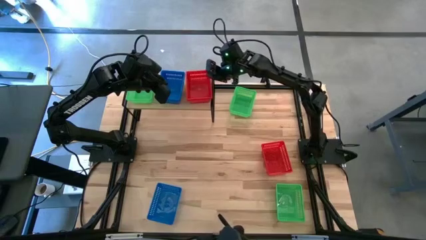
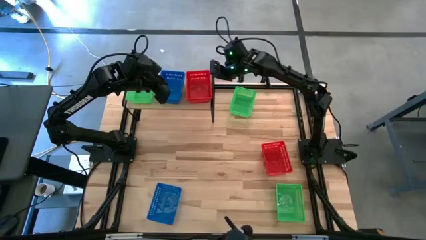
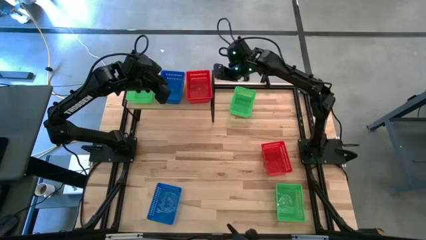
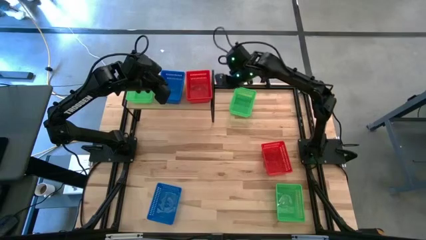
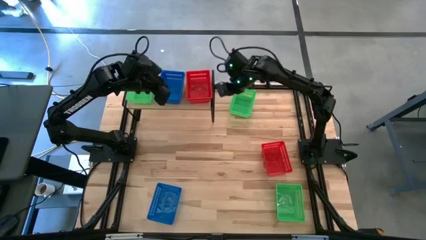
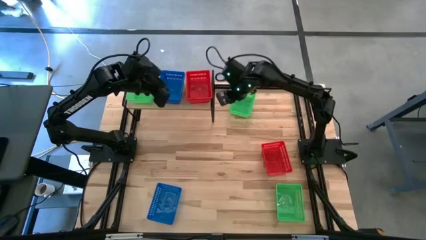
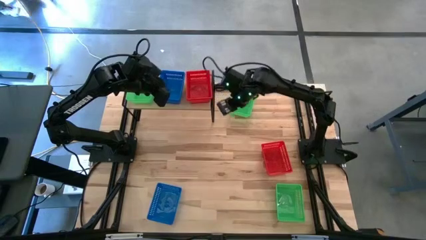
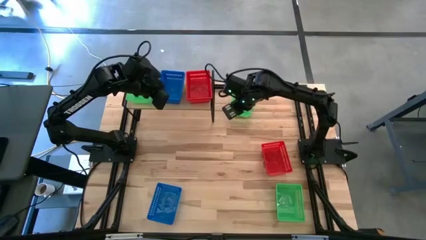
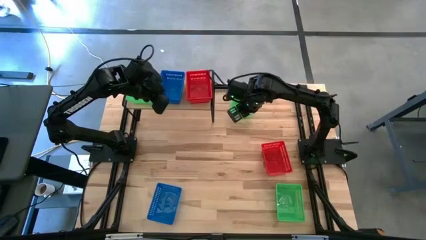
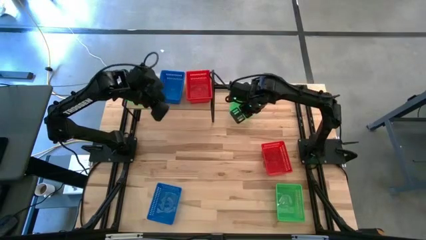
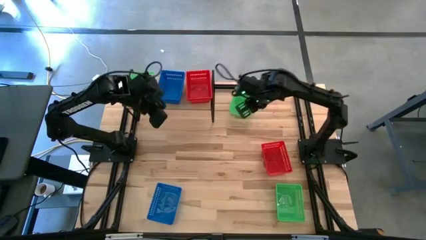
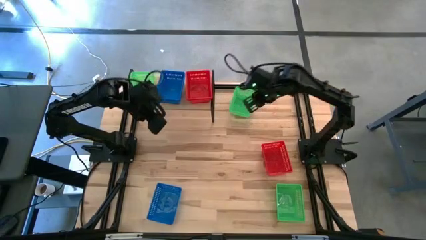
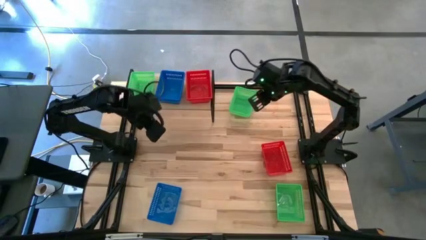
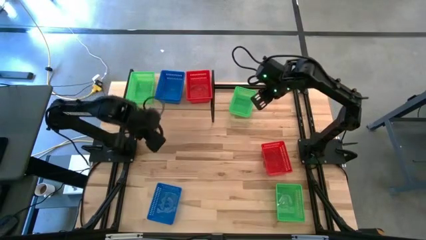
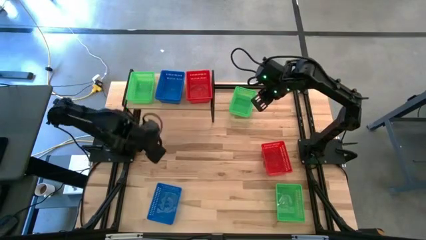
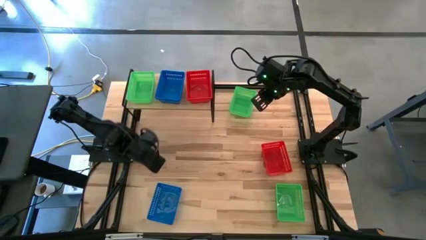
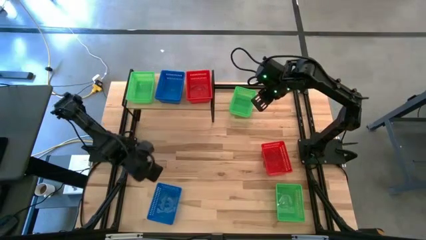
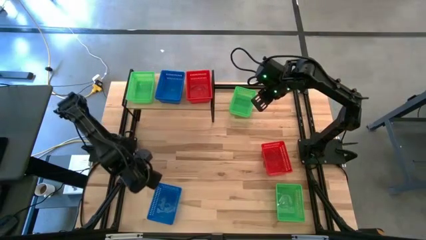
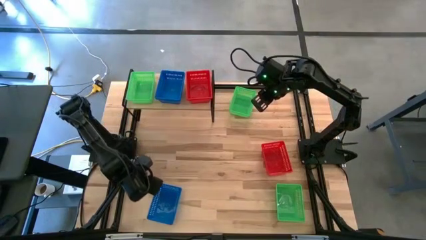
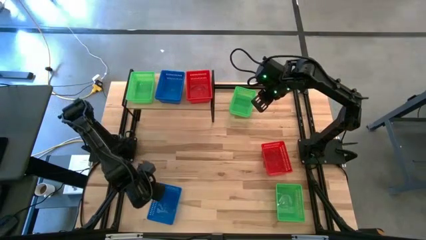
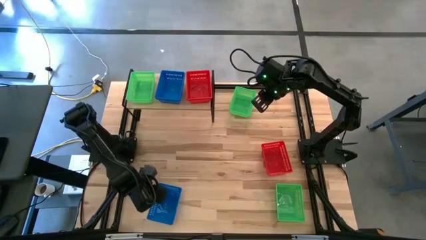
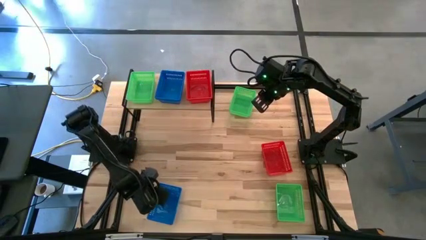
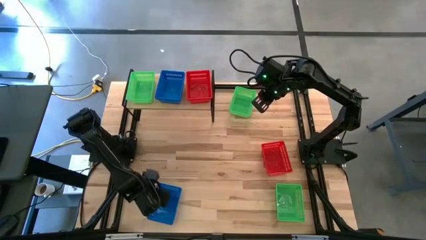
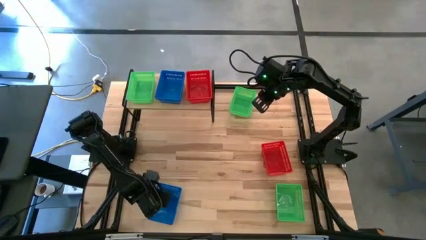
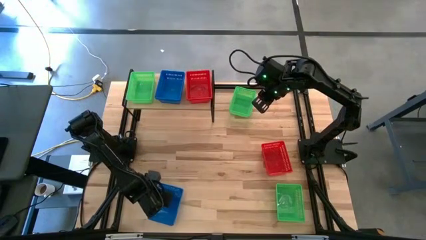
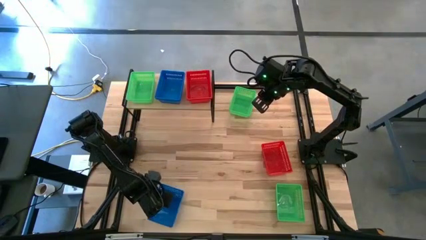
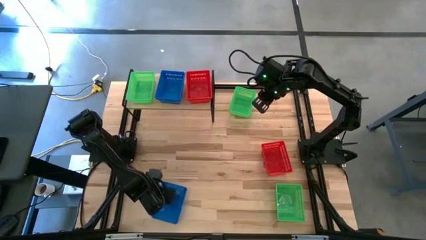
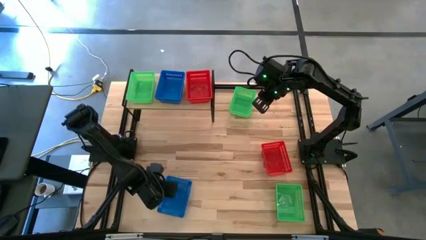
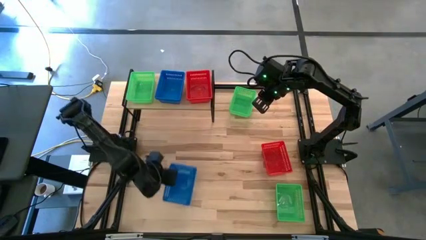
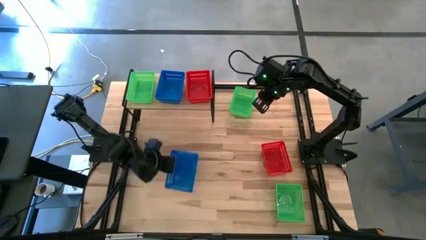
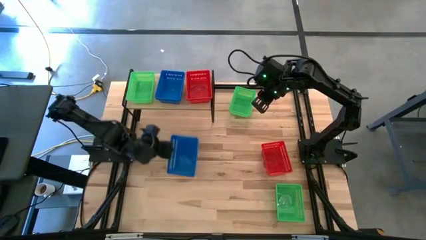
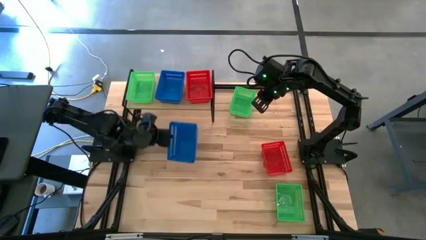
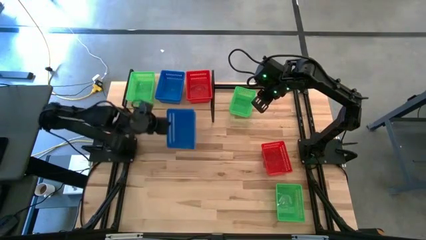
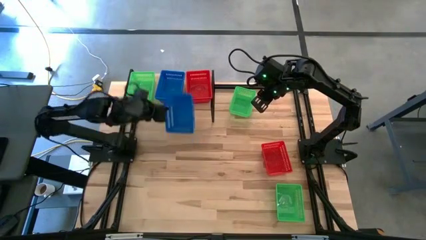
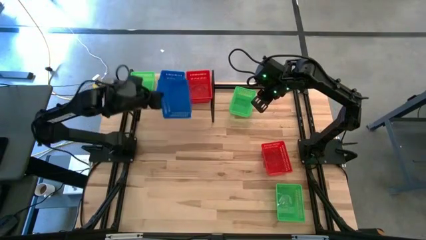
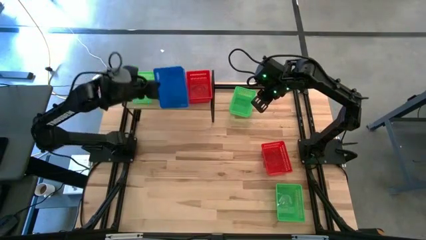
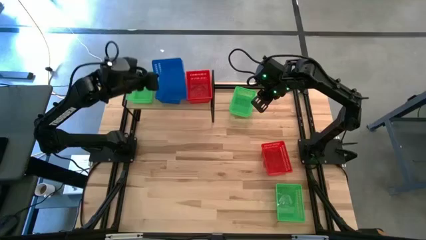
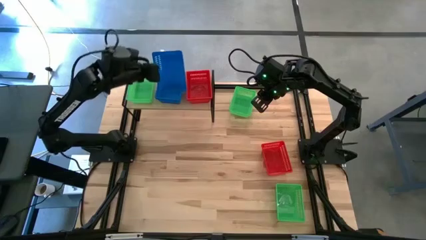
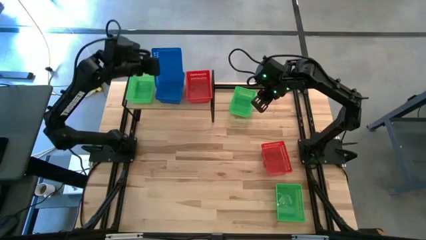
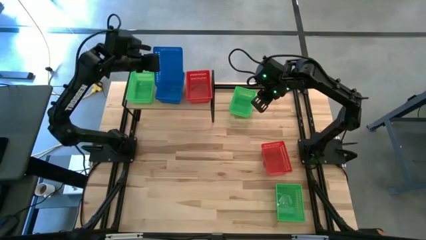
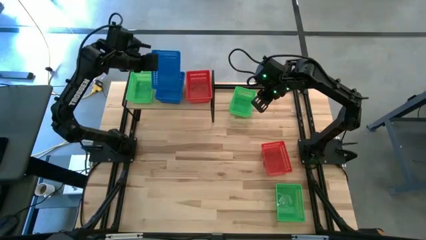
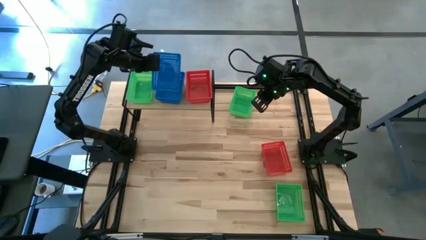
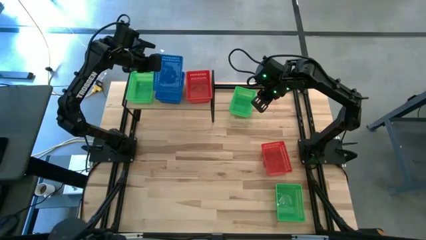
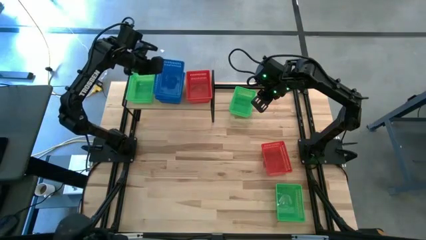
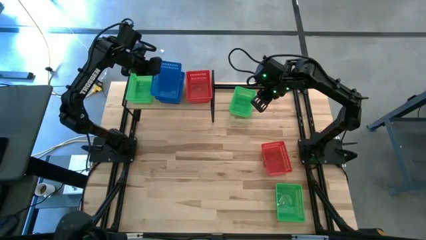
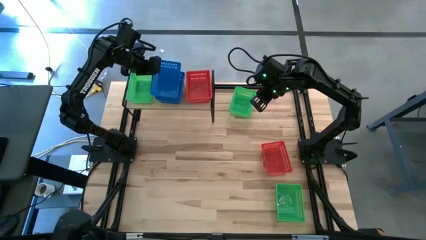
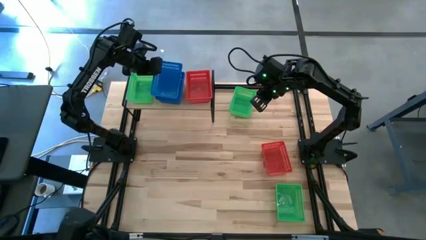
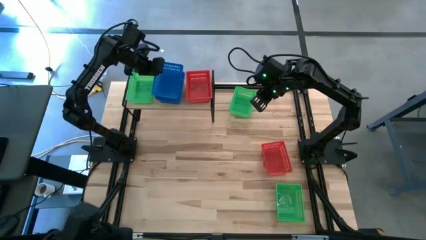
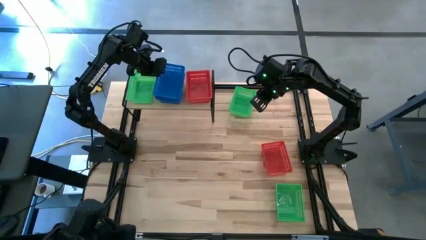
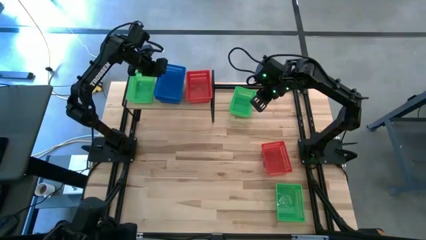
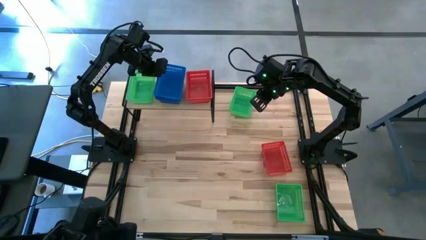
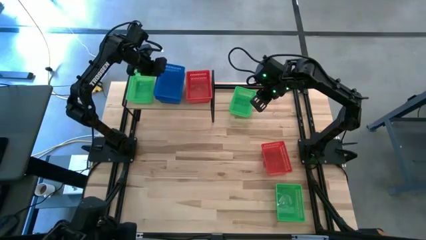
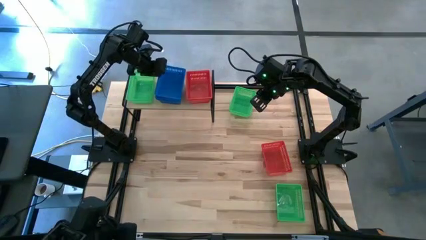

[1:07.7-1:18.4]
Task: Stack baskets on shelf by color
Stack the blue bin on top of the blue bin on the shelf

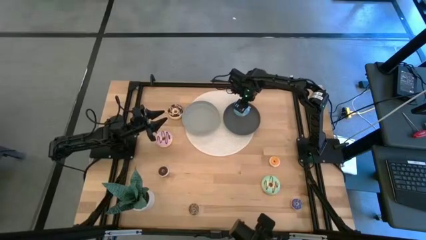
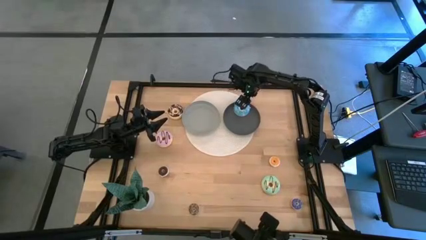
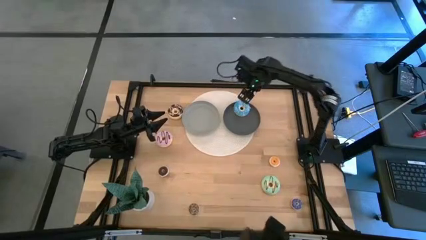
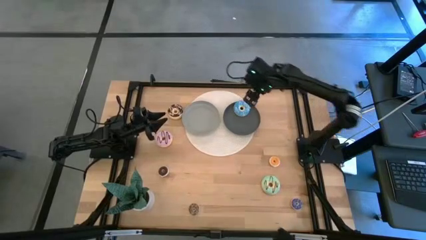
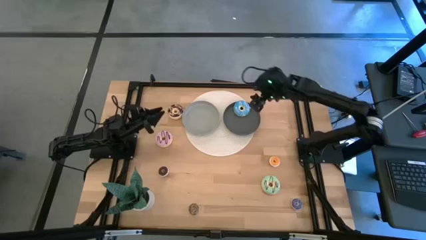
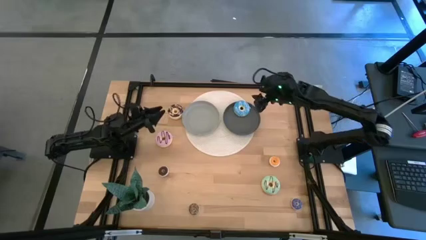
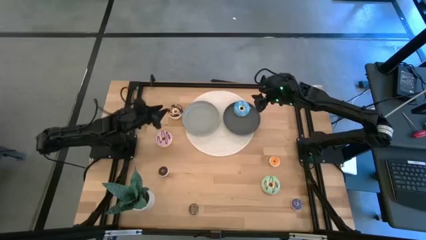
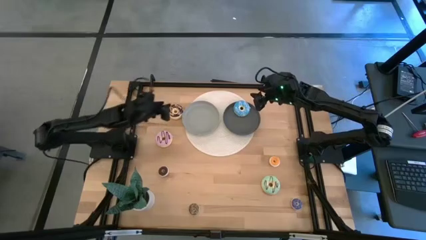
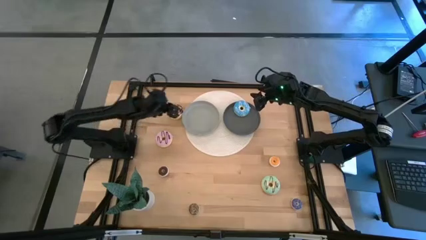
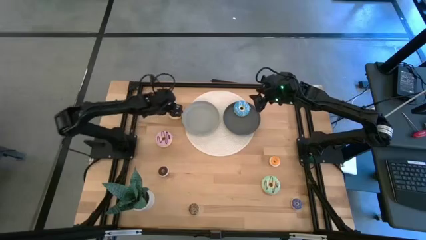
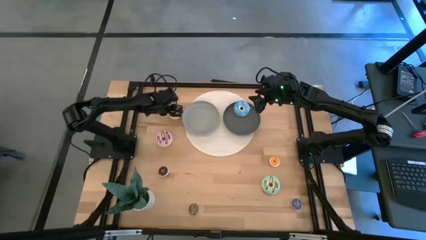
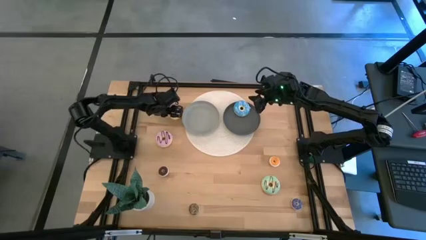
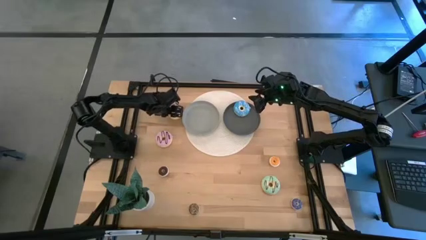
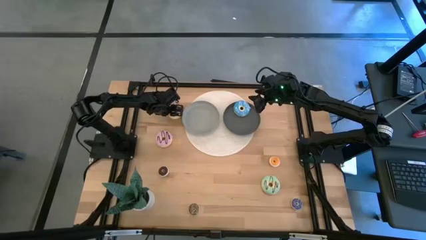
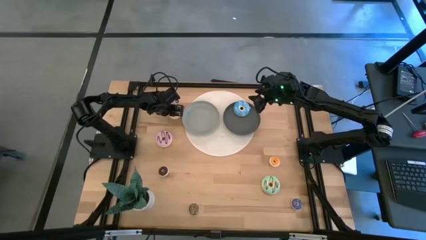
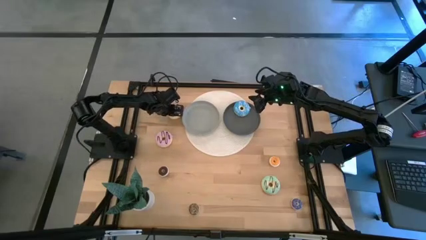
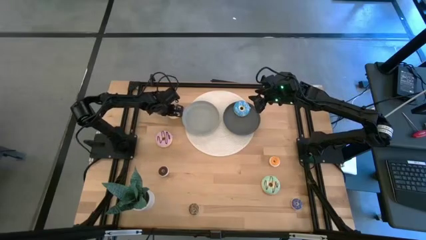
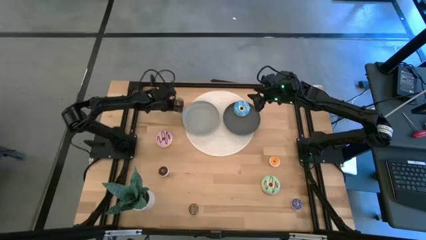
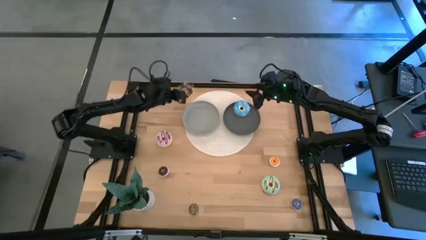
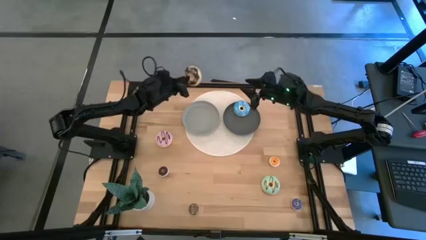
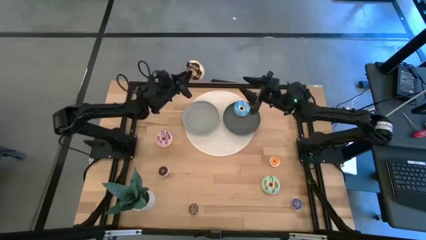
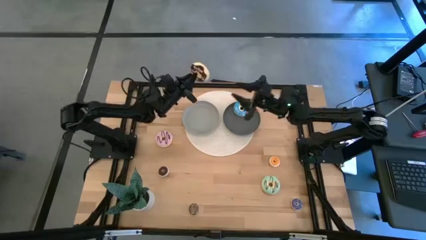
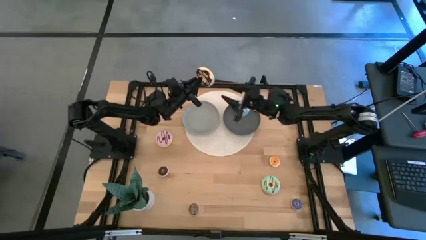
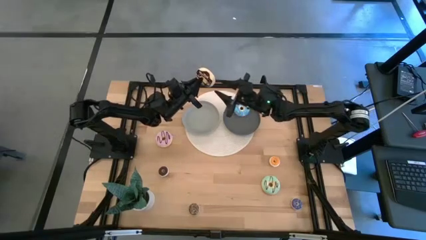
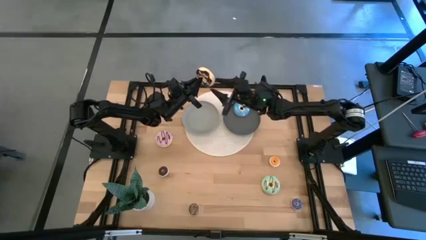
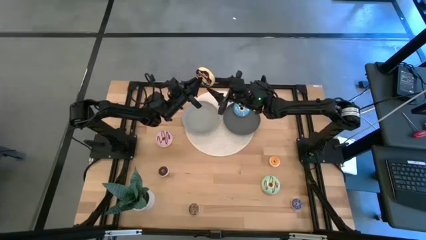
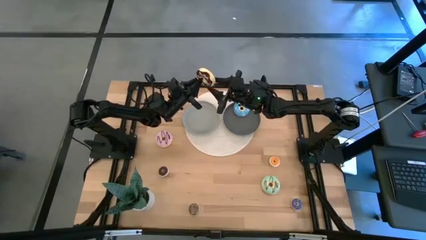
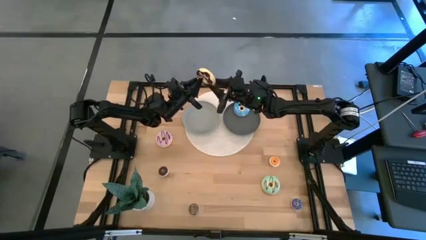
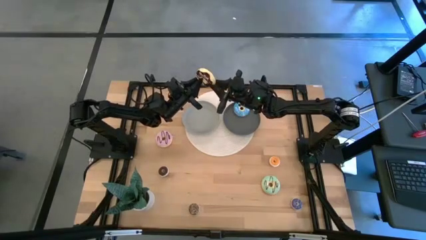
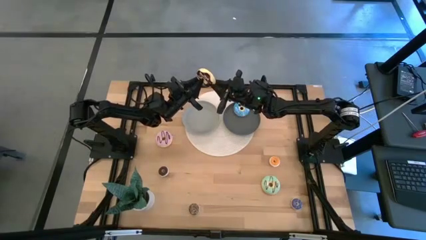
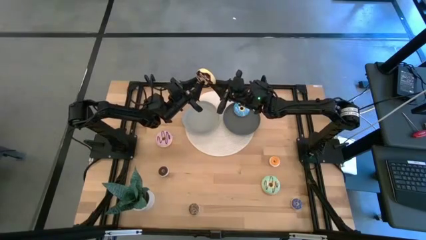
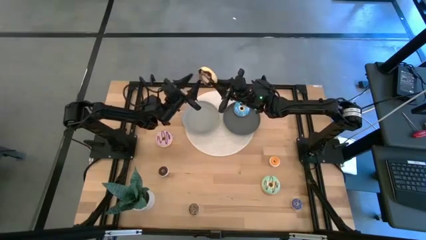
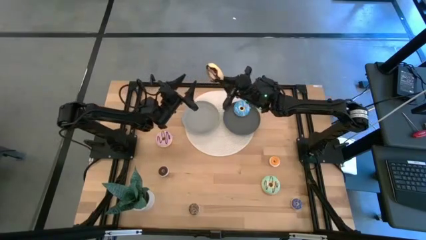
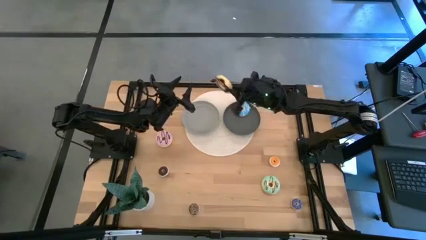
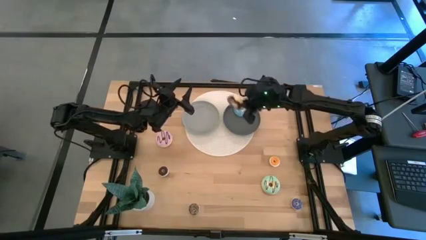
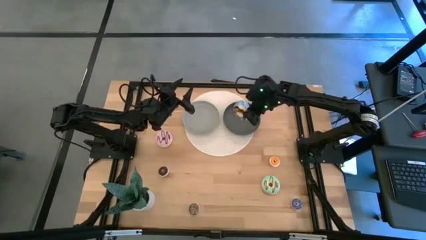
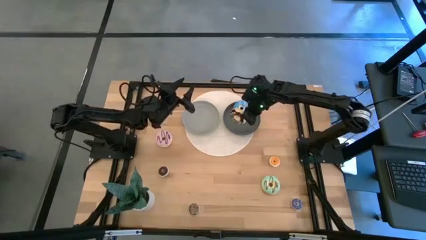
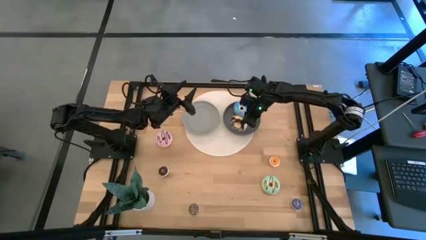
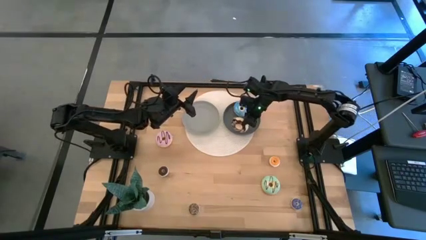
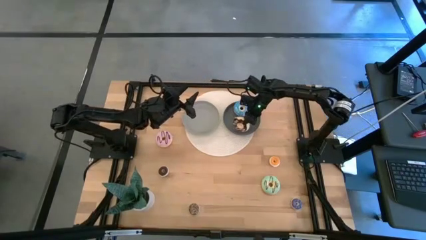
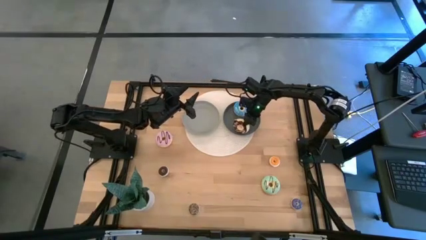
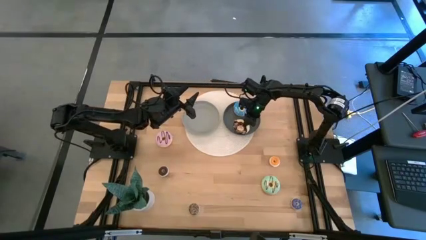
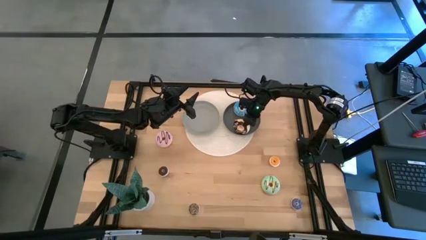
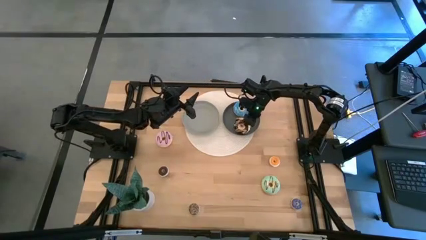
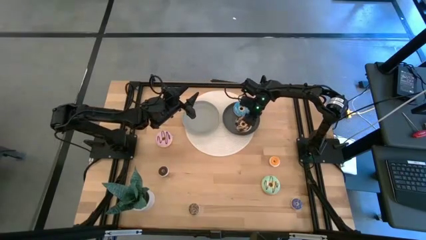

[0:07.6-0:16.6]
Task: Pick & Place donuts
Put the large black donut on the dark gray plate
